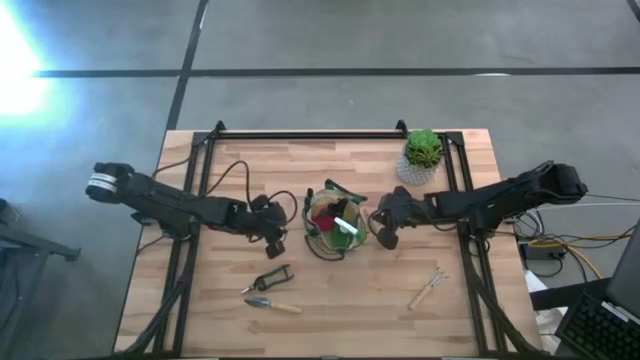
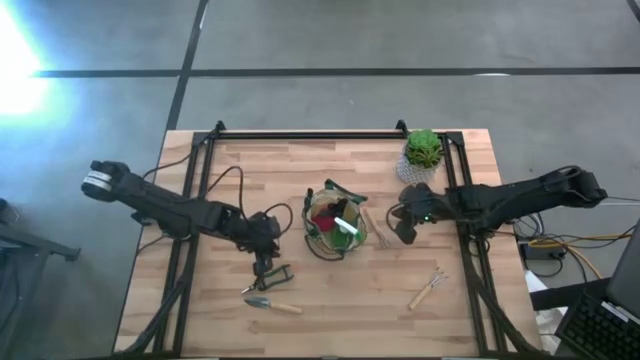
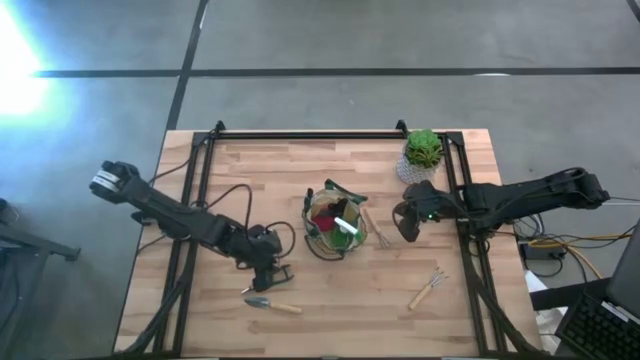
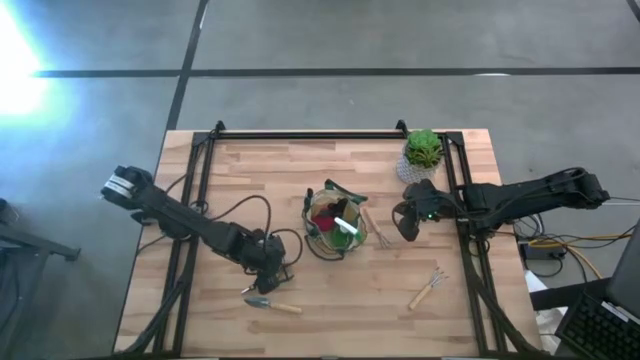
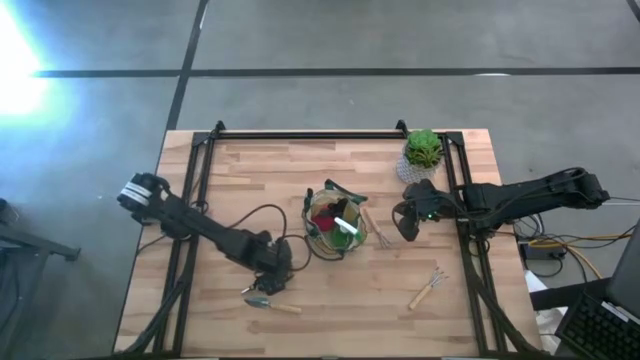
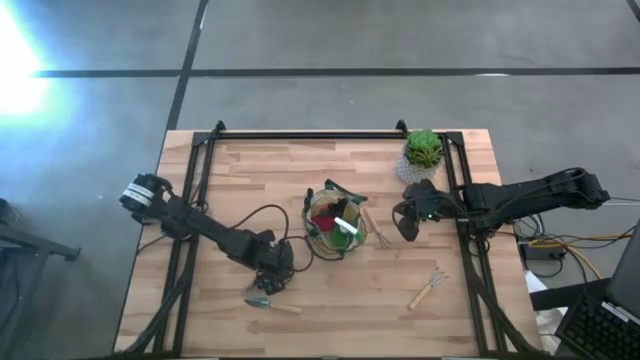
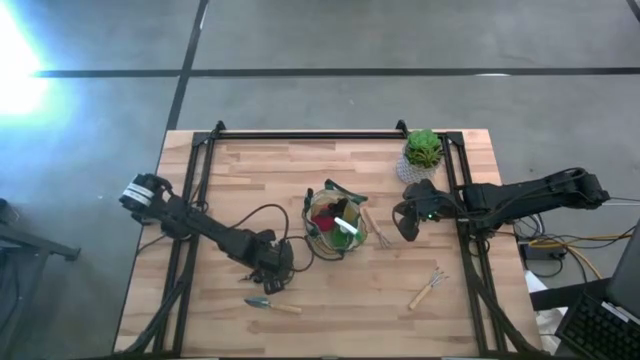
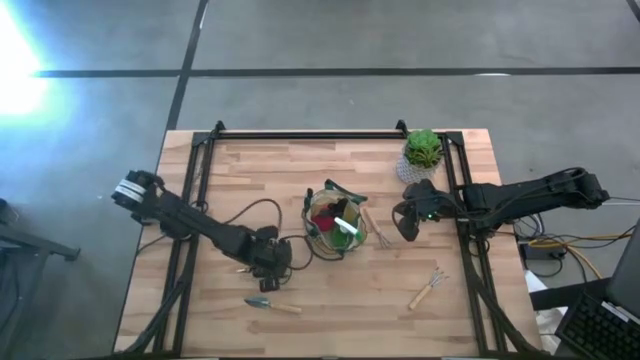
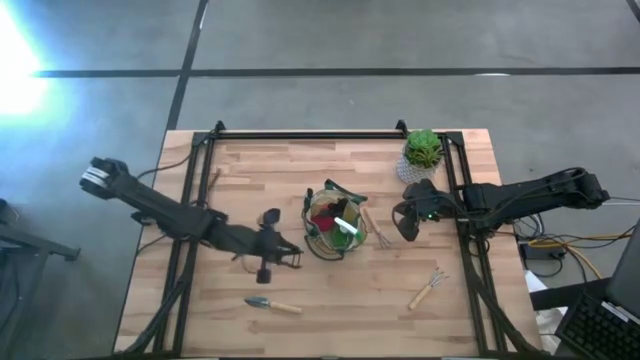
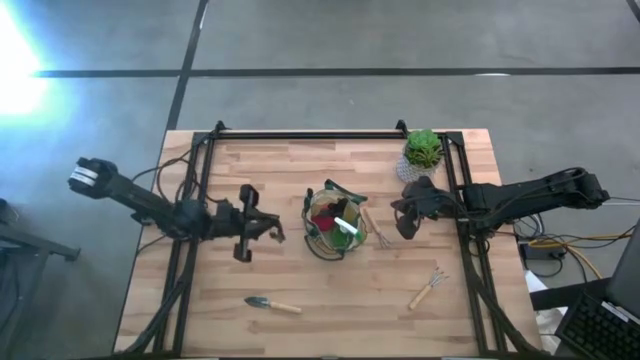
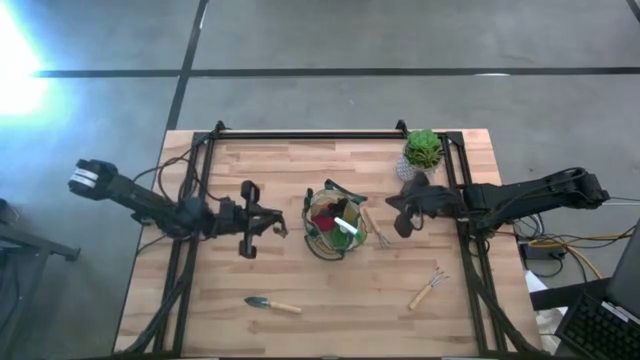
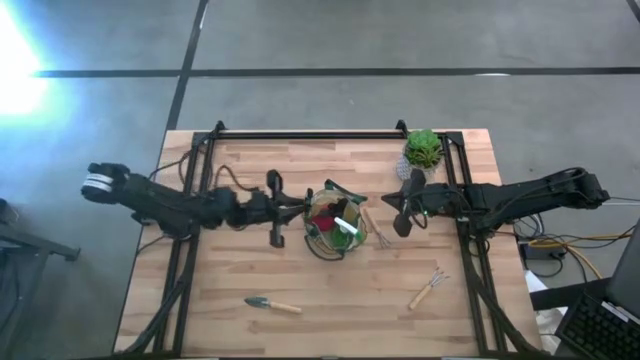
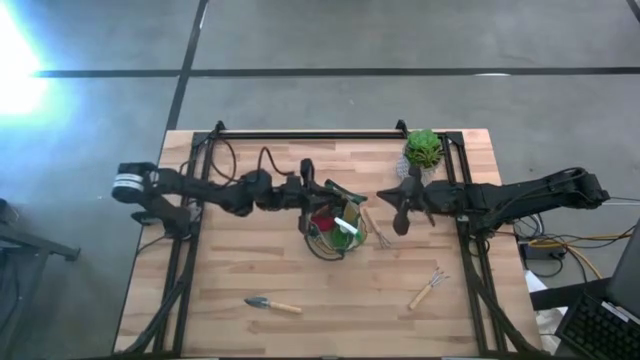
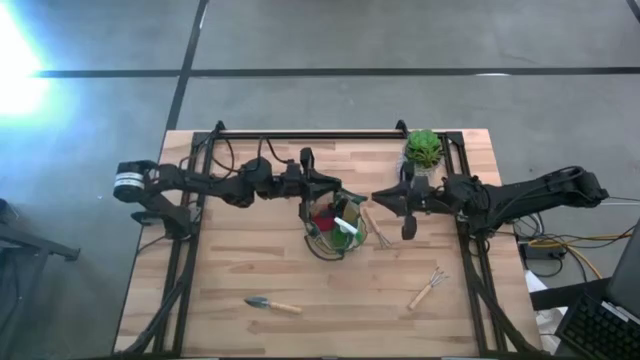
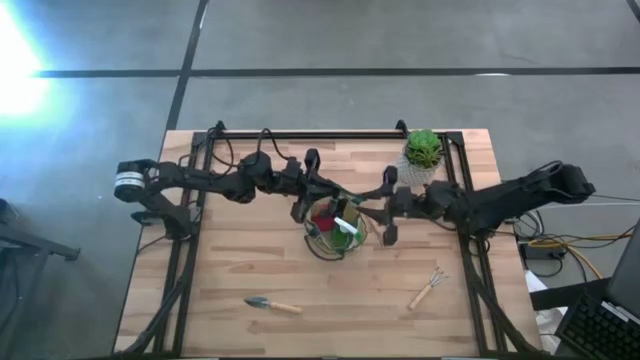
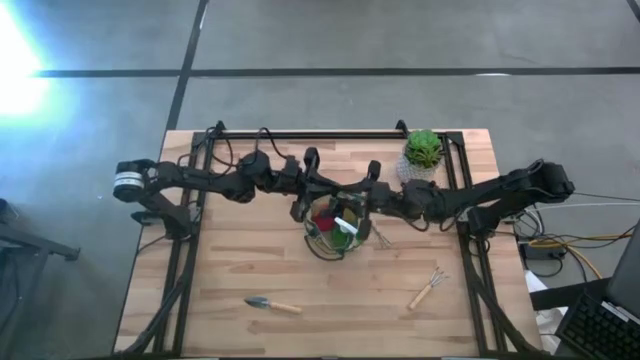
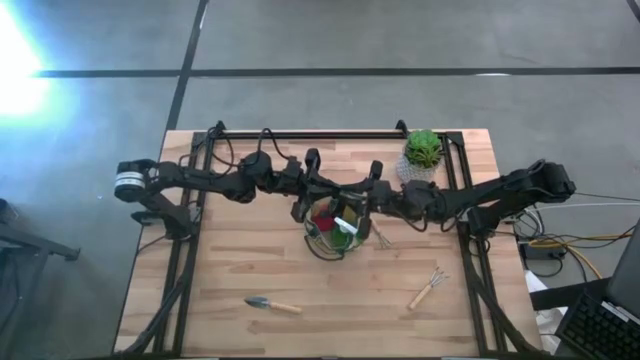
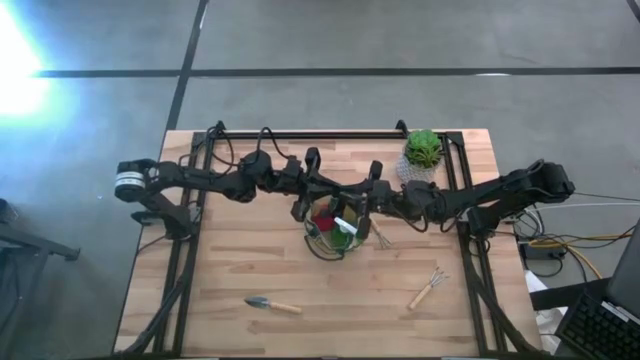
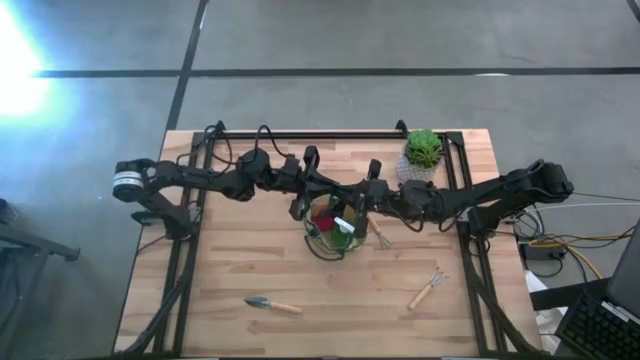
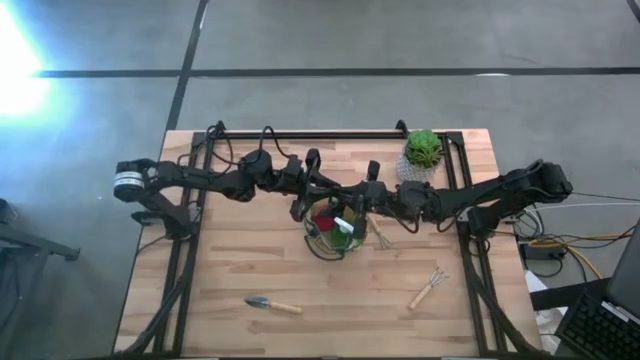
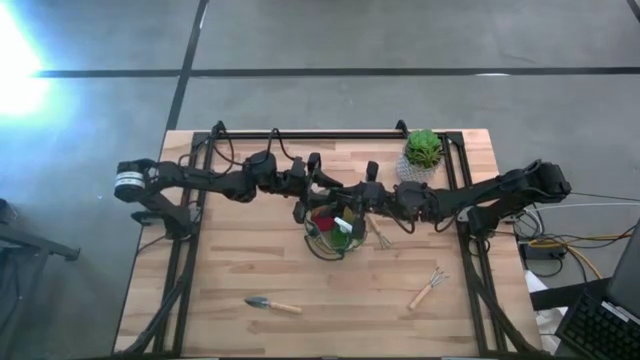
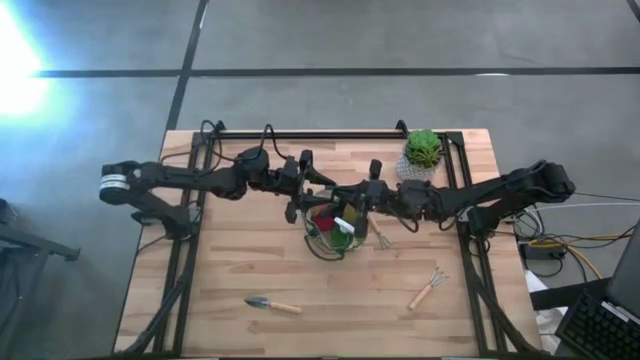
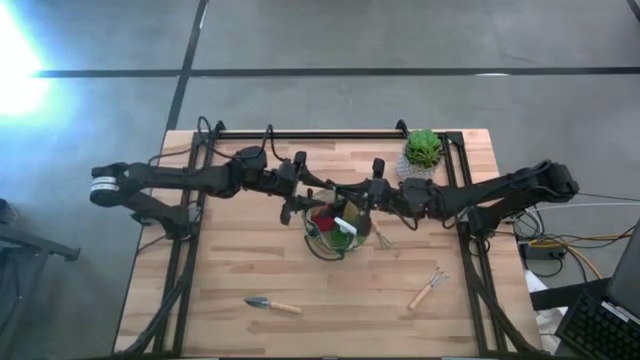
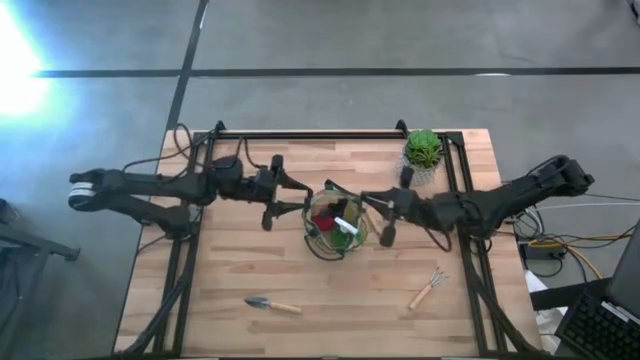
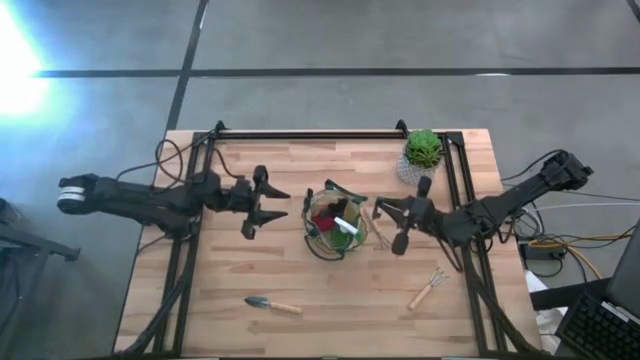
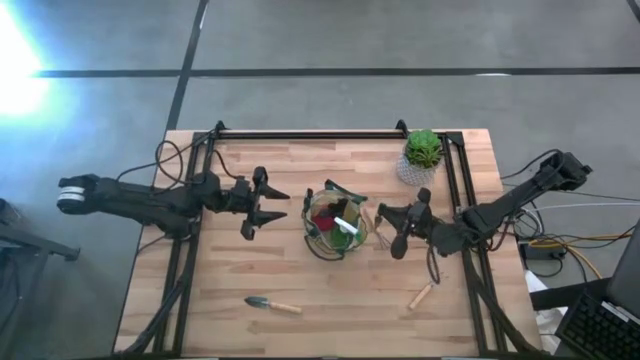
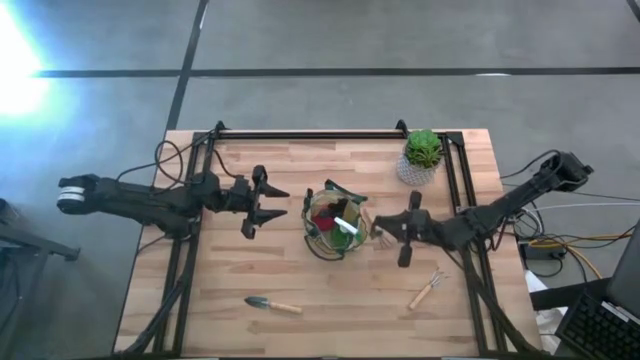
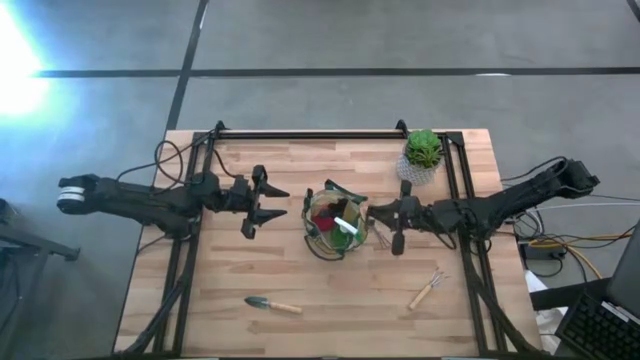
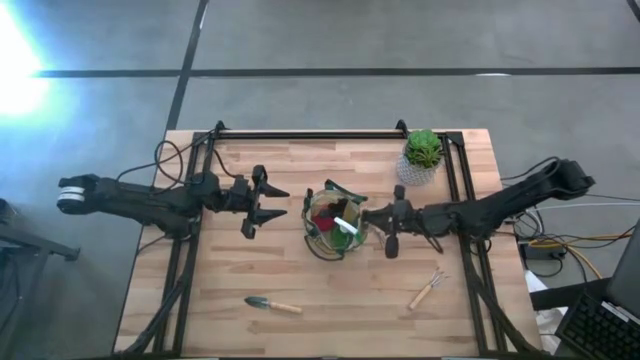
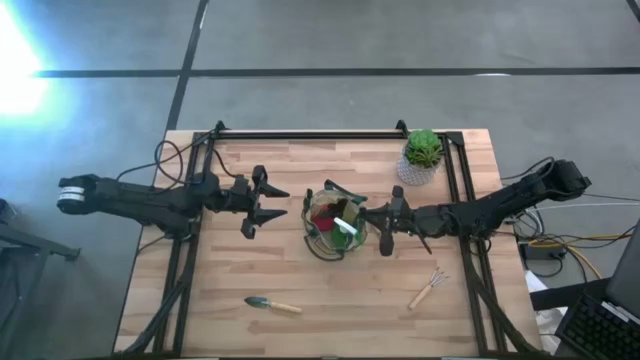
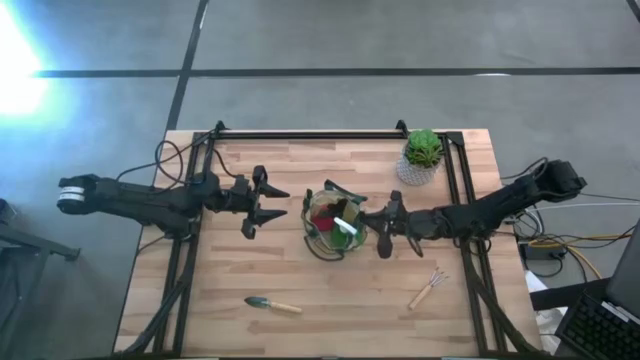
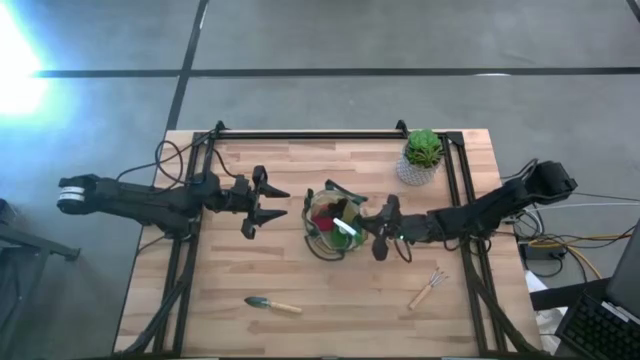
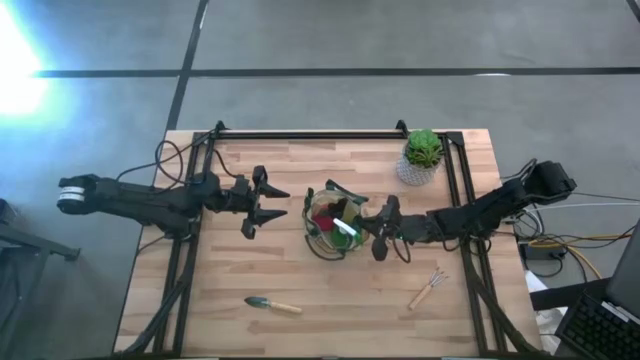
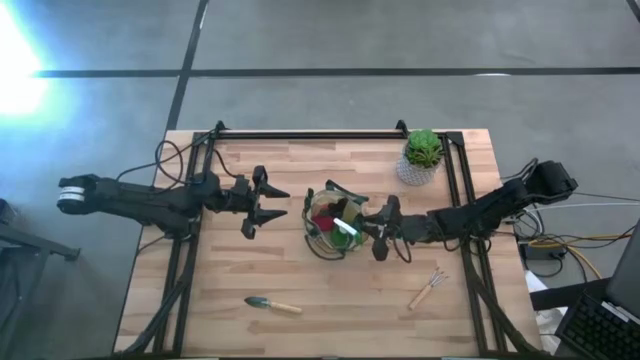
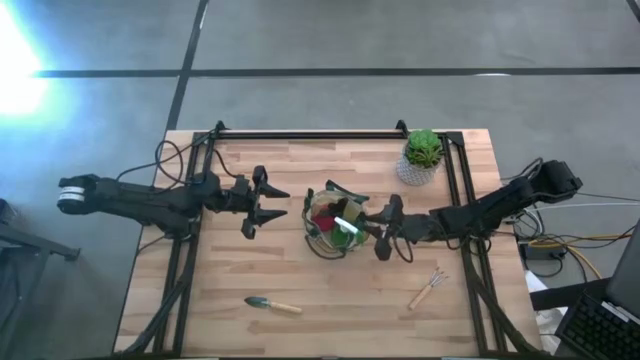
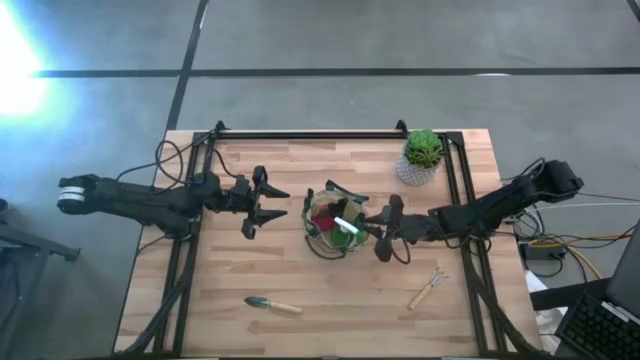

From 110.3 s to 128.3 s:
Task: Pick & Place Garden tools in Gardening bag
Put the green fruit pruner into the light brown gardening bag

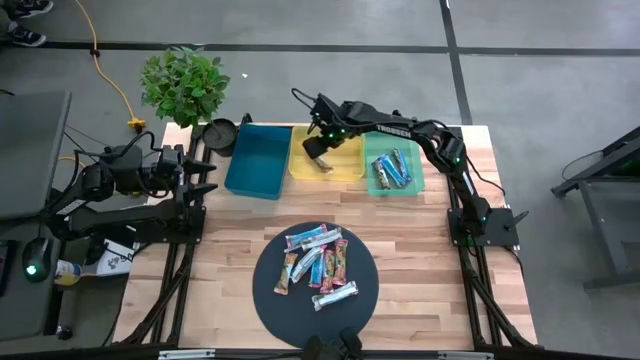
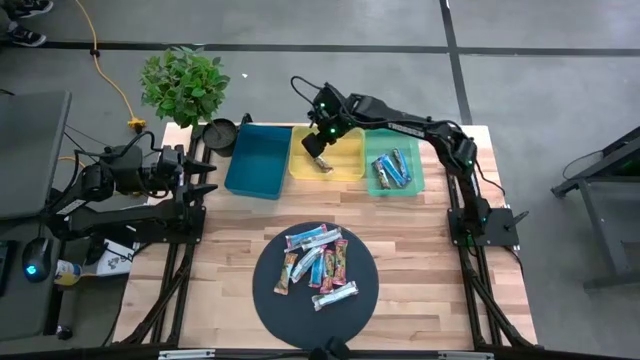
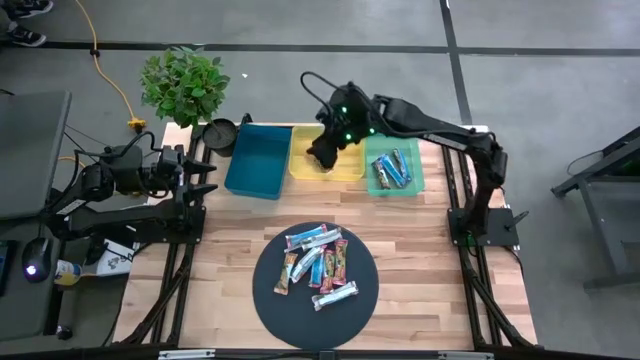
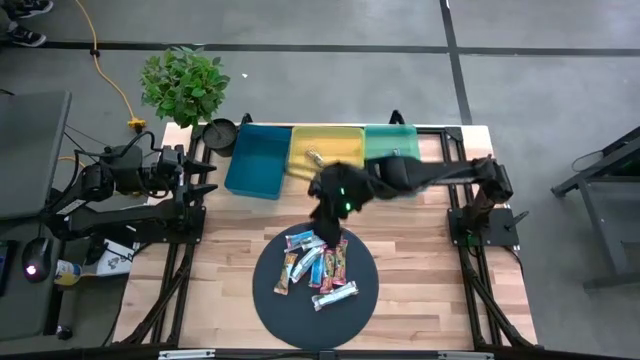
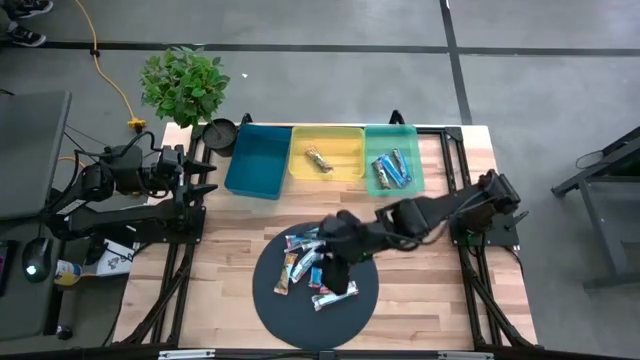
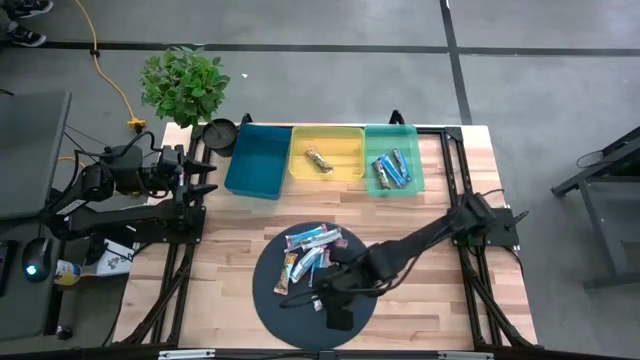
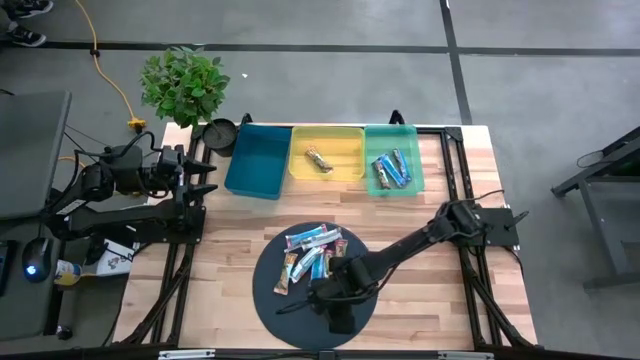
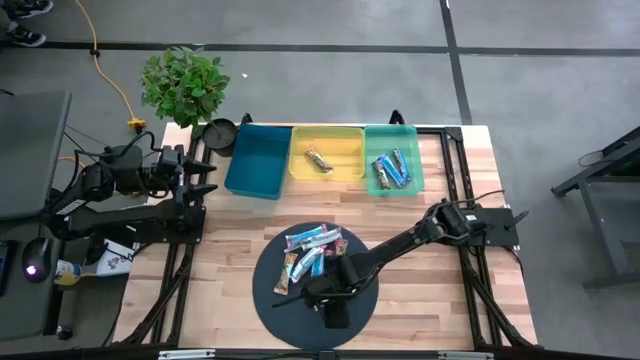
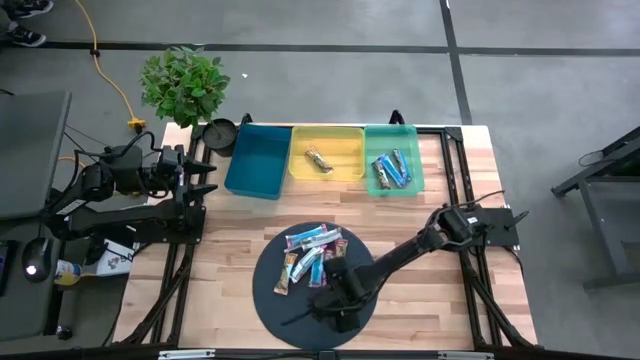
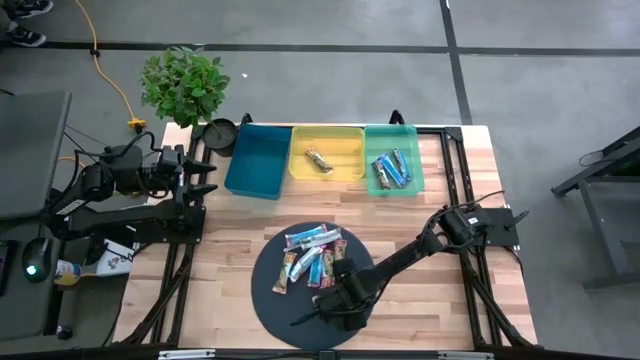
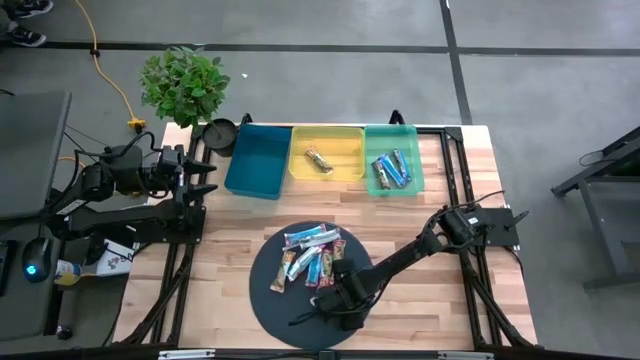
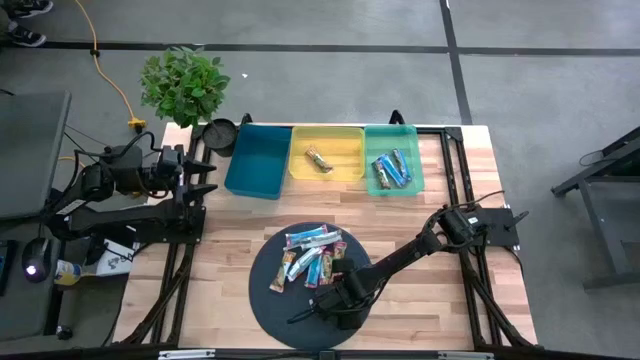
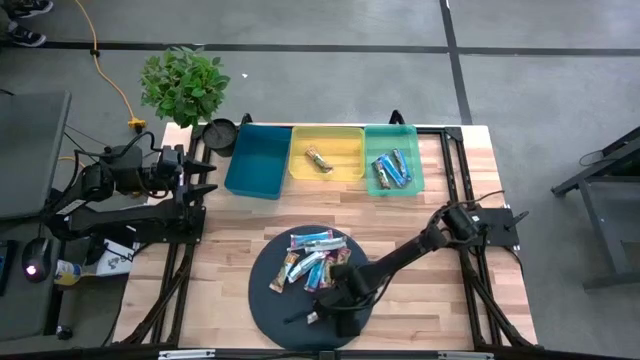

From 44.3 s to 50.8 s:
Task: Pick and place Granola Bars by type
Put the yellow granola bar into the yellow bin
